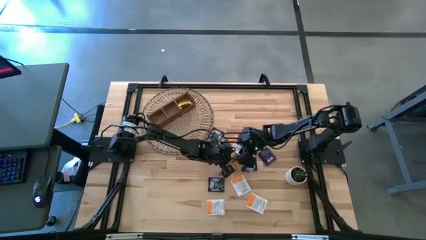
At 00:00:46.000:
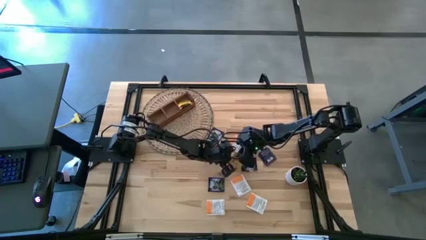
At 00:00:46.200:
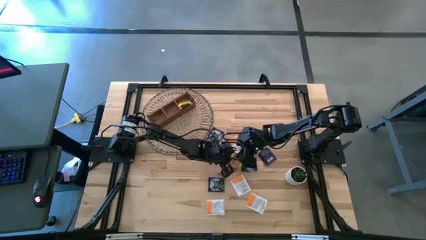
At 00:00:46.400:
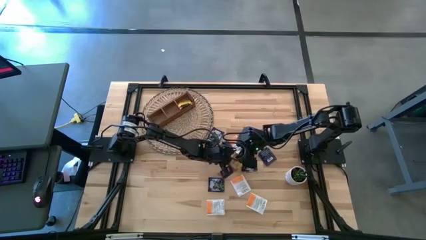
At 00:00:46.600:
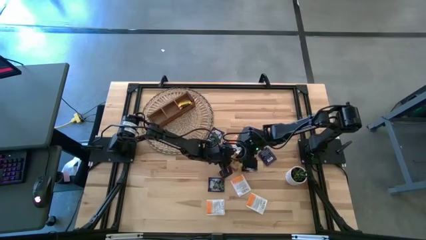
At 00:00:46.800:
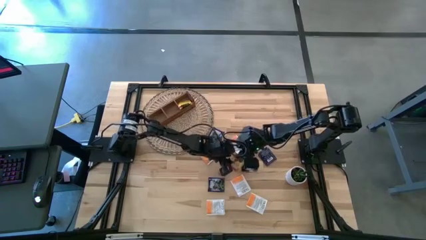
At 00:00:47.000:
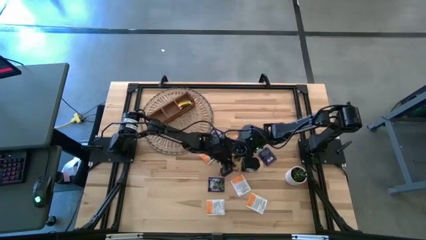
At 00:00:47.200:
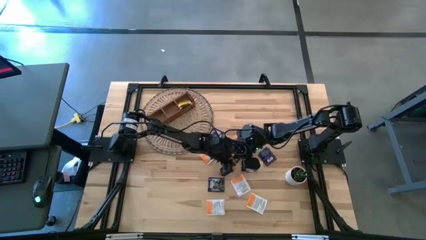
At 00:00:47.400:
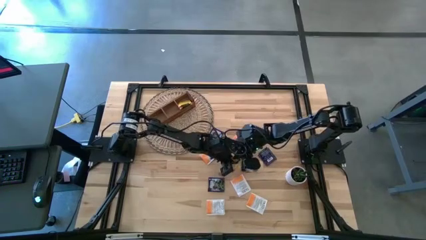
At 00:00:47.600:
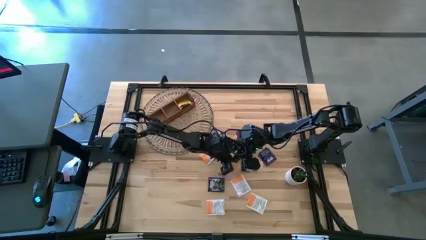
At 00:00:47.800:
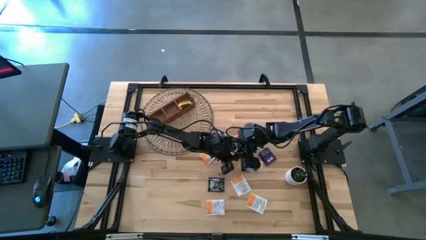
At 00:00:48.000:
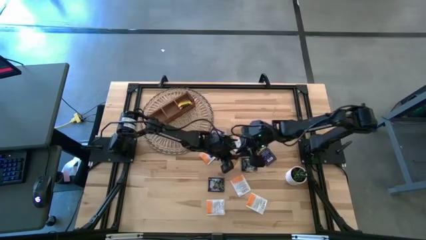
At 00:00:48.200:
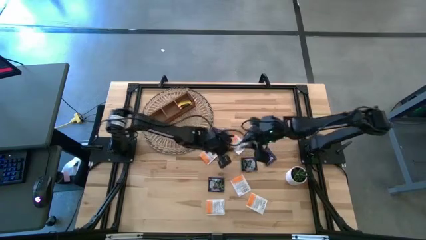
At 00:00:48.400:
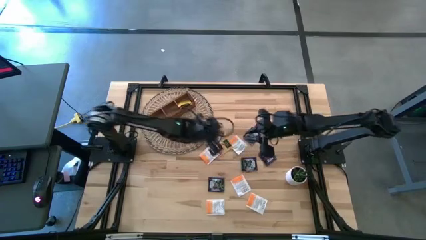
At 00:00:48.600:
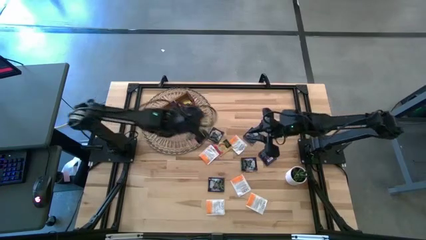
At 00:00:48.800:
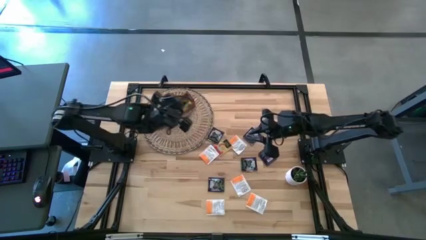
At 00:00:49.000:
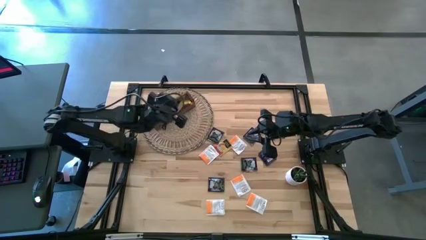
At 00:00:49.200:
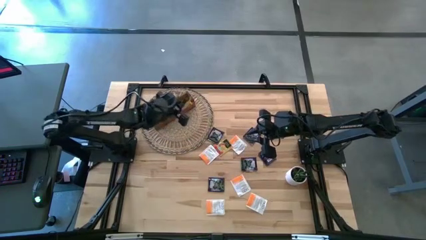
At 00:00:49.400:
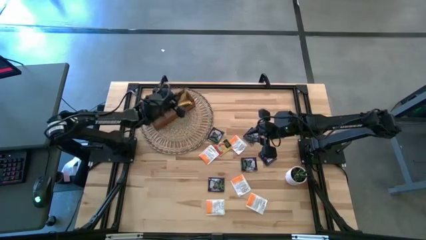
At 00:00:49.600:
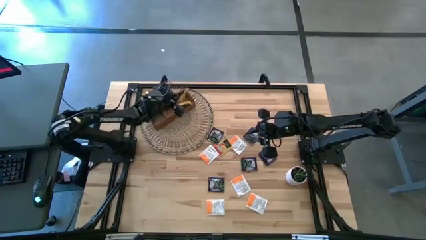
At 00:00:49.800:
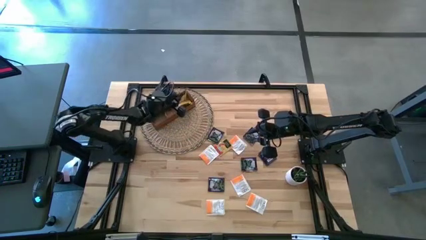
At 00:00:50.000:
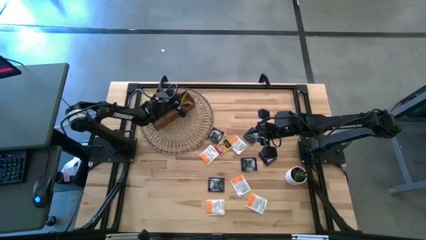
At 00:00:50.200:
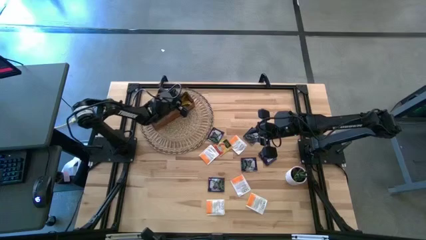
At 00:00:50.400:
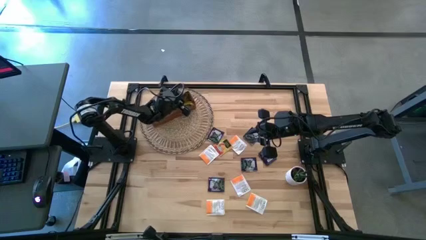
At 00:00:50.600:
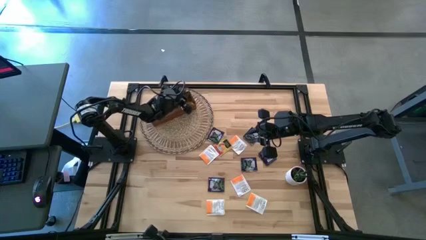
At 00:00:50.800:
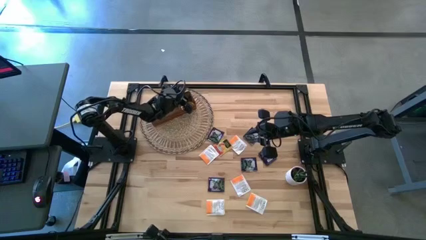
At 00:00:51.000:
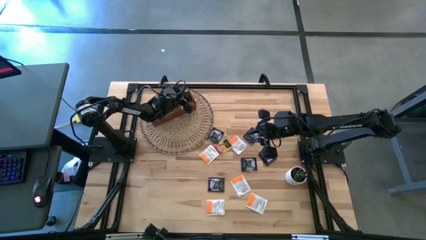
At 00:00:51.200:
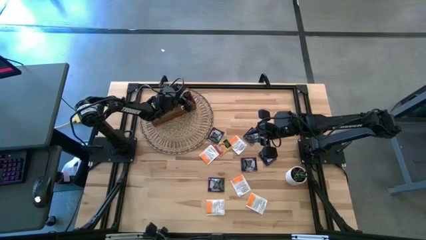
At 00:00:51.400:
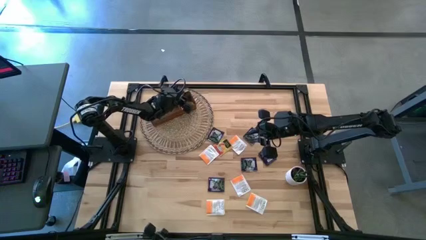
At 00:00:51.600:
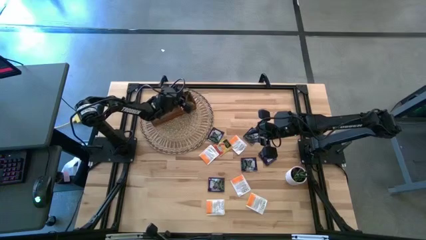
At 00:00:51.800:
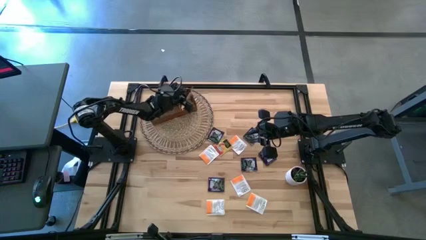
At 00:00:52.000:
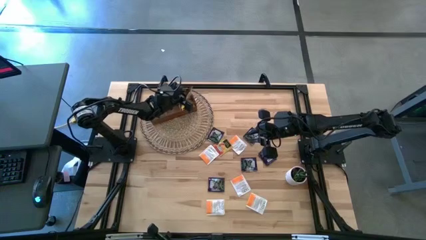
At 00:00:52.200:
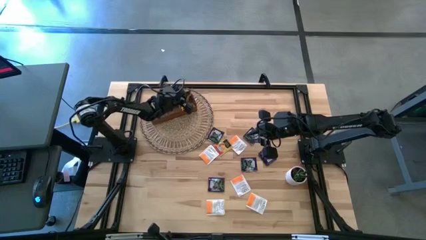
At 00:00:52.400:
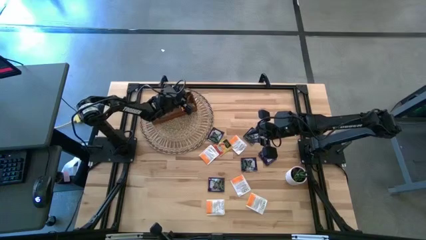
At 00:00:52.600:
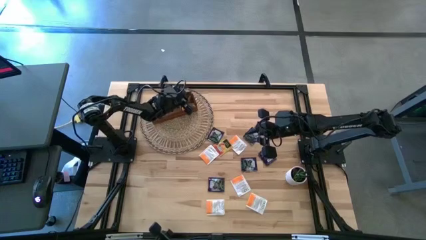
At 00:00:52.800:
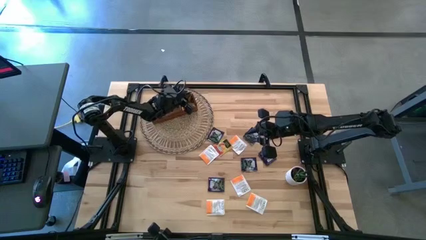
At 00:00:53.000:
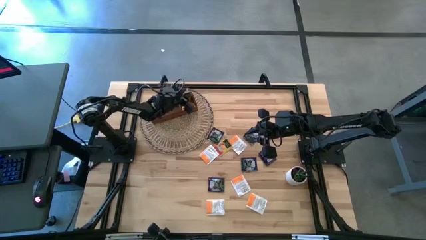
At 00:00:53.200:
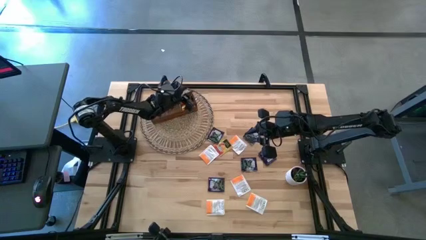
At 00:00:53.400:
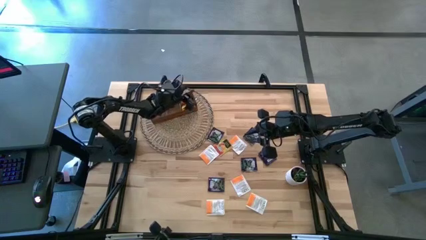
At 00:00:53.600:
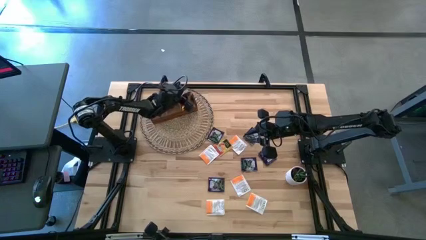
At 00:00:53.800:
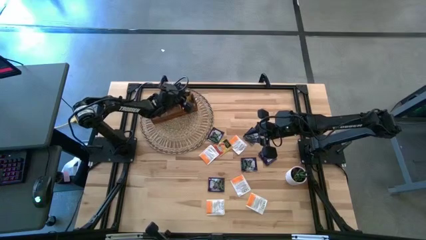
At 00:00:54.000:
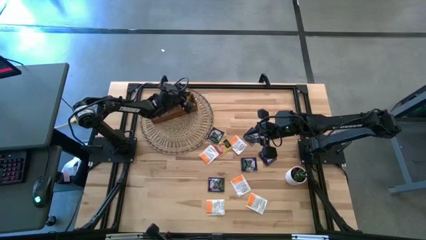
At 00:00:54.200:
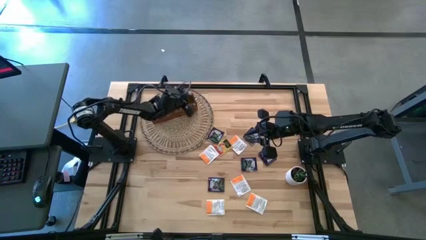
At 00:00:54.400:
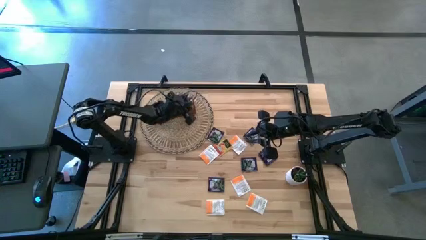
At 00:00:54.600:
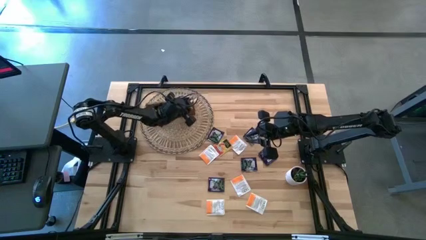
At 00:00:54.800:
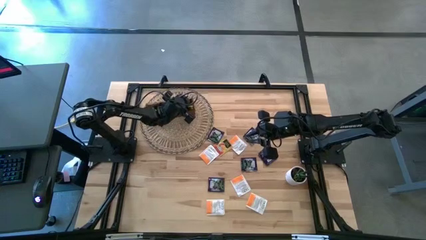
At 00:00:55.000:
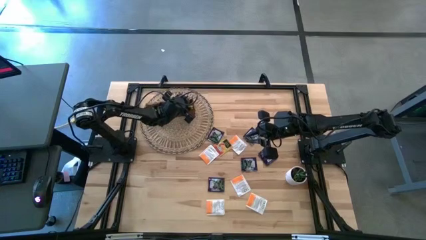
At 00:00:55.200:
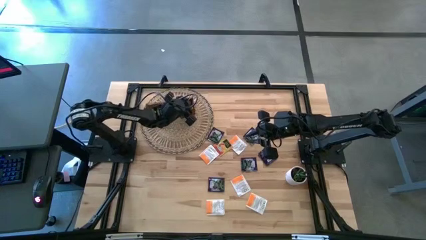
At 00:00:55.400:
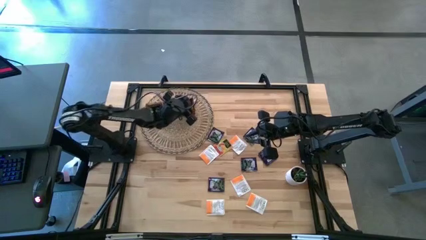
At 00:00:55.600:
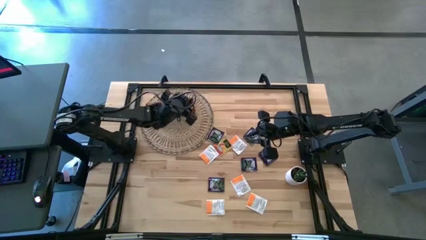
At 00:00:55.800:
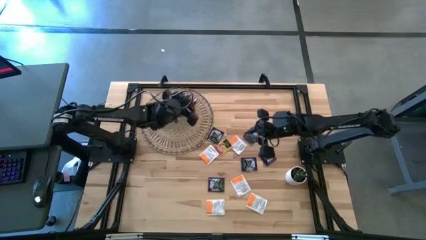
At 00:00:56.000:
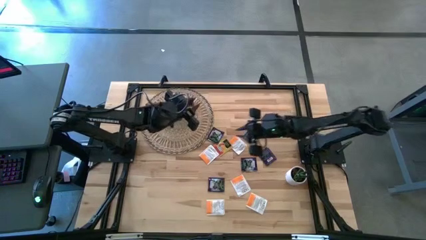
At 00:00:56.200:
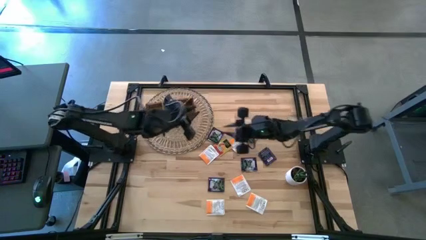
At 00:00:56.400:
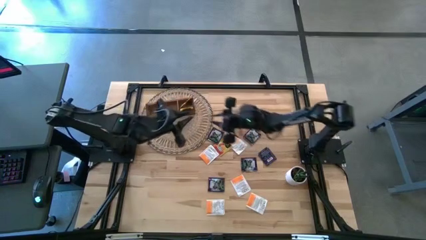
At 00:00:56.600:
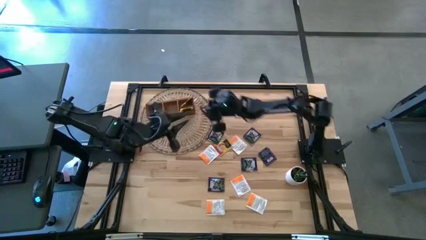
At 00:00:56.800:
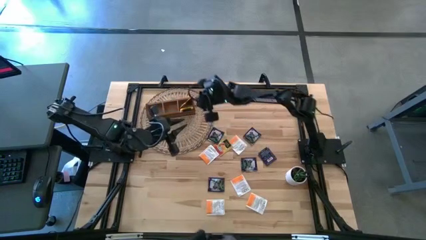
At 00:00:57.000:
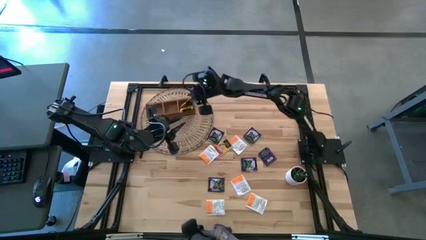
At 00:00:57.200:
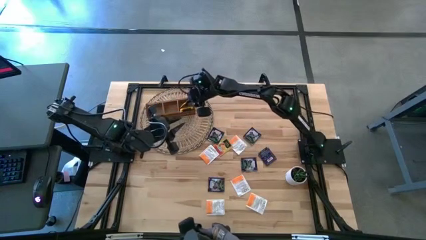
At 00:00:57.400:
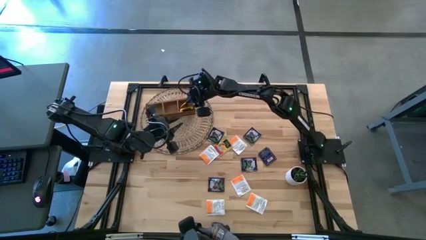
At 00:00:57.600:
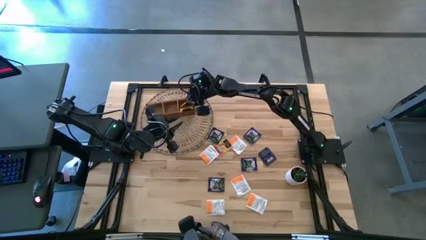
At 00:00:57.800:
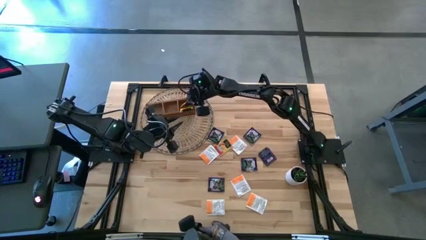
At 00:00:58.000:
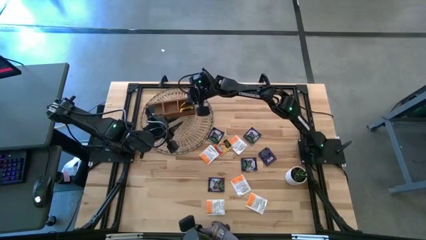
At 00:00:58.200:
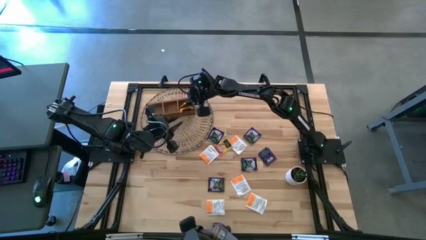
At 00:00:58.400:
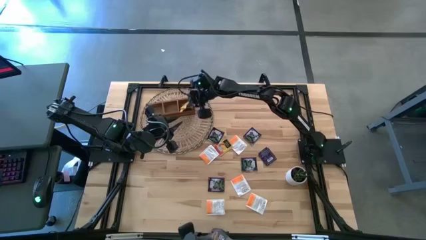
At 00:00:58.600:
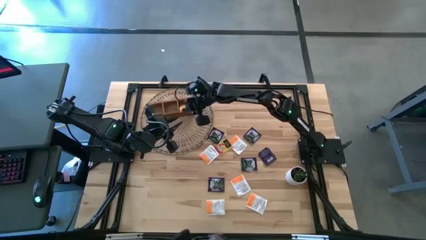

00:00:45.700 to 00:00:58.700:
Task: Pick & Place Tea
Put the yellow tea bag into the right section of the wooden organizer

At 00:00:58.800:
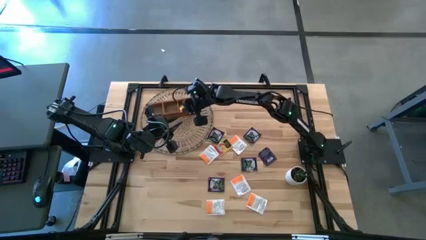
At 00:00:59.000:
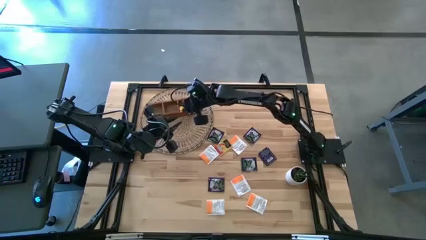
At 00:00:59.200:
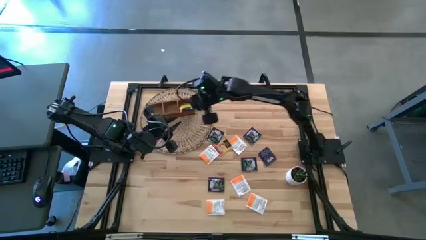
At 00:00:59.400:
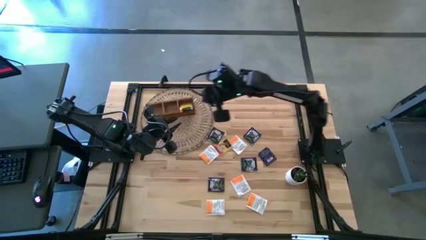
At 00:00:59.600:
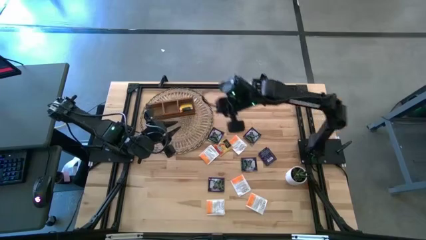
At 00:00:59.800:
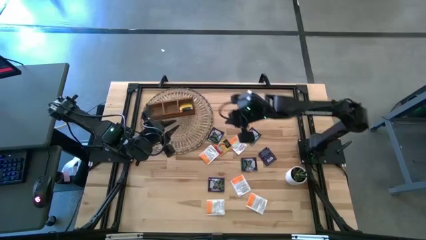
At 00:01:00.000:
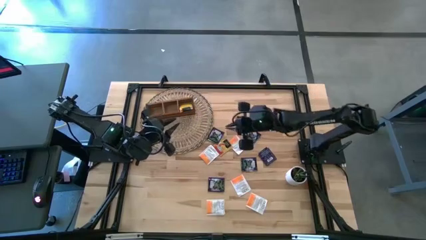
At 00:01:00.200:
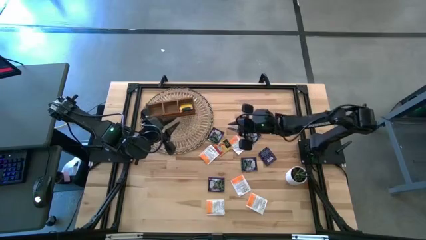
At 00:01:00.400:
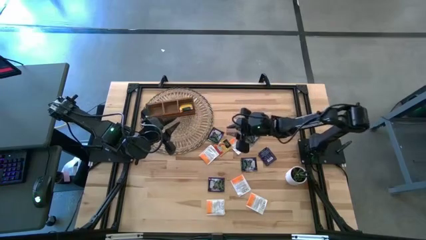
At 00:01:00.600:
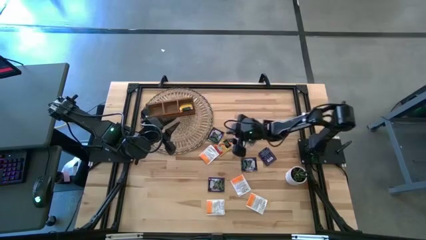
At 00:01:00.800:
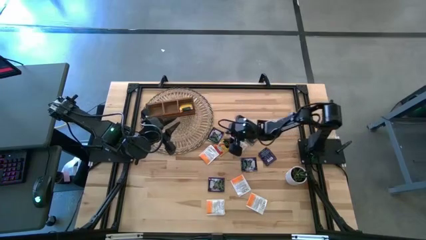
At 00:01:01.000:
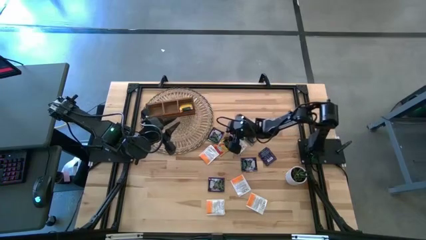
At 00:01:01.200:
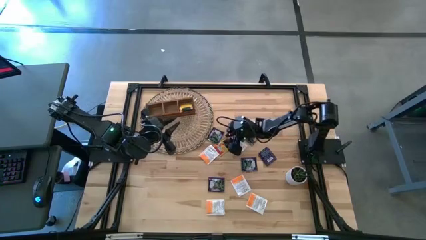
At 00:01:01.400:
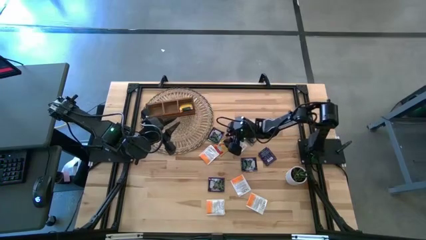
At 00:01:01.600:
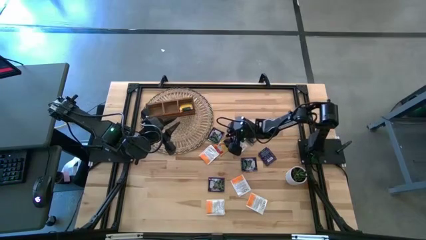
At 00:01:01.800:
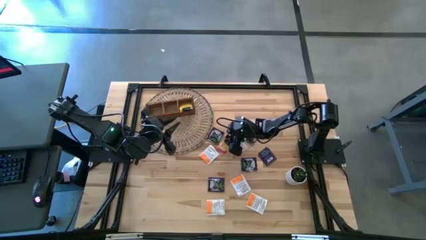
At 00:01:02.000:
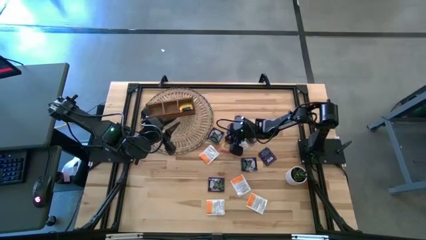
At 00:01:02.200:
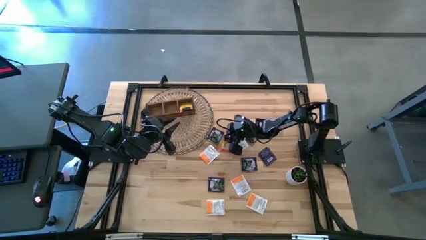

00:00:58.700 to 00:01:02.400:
Put the yellow tea bag into the right section of the wooden organizer
